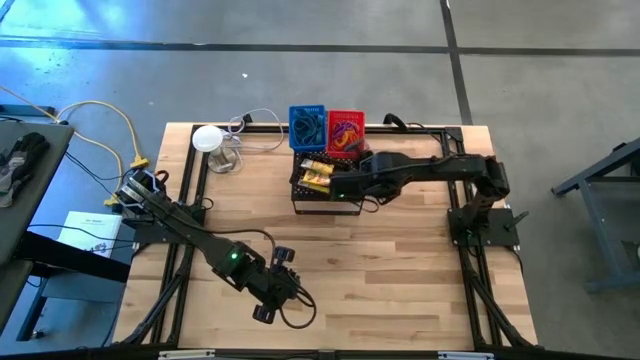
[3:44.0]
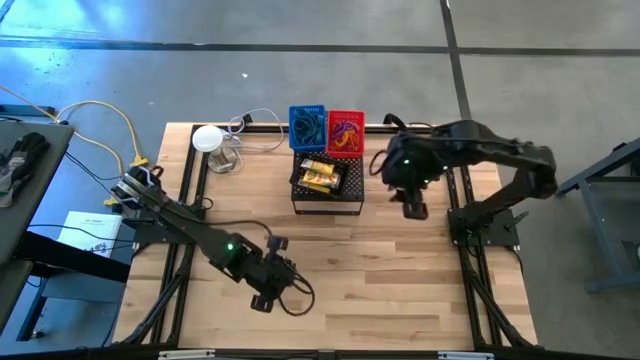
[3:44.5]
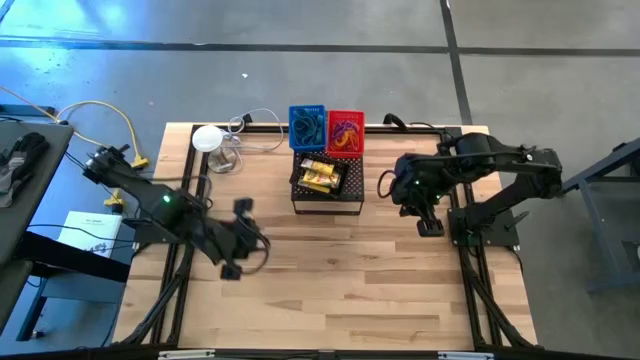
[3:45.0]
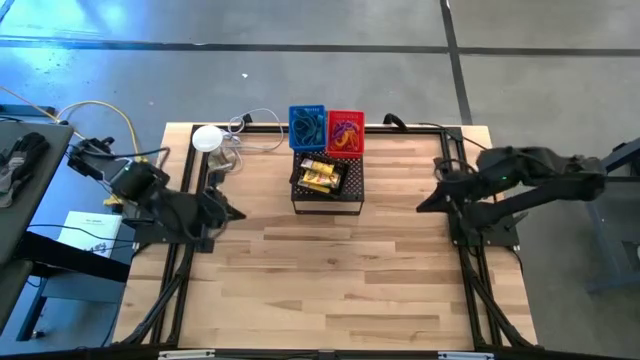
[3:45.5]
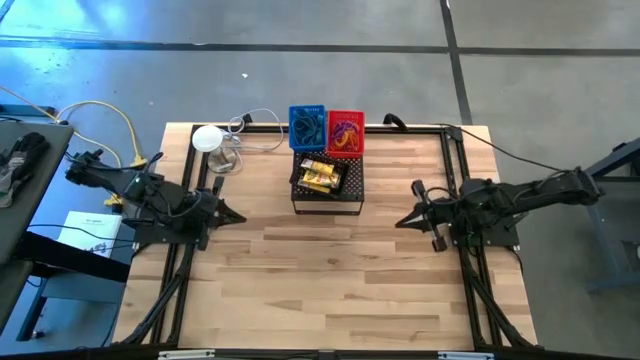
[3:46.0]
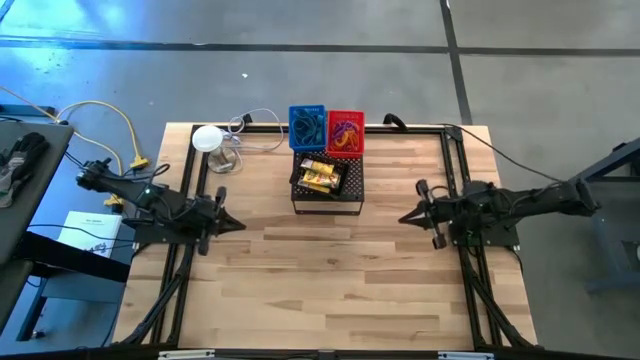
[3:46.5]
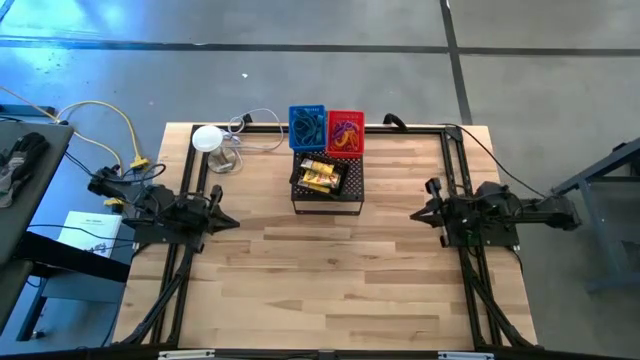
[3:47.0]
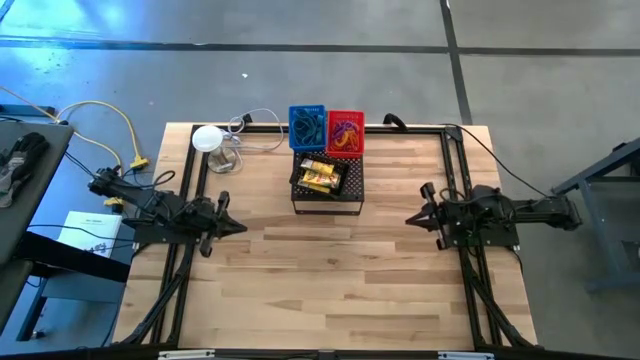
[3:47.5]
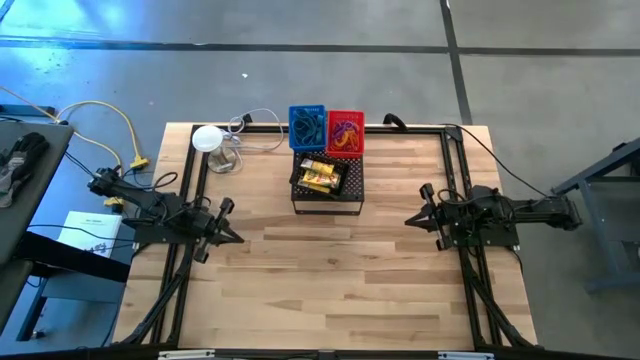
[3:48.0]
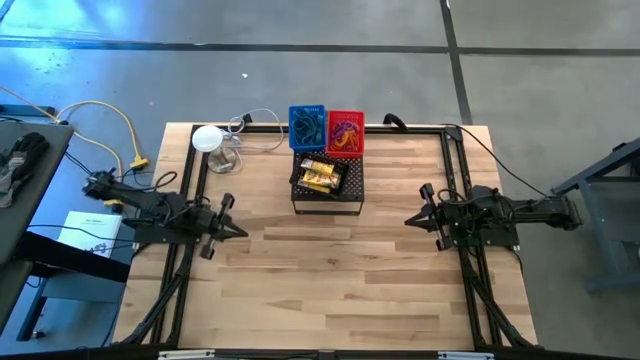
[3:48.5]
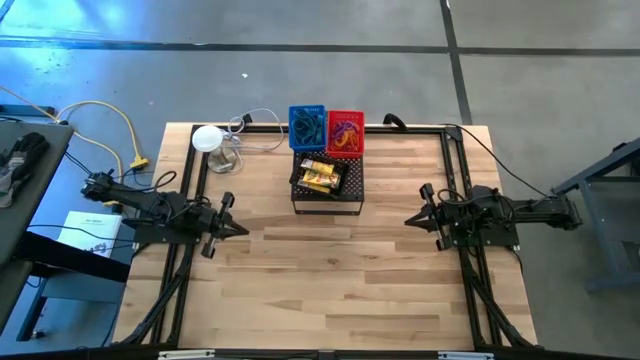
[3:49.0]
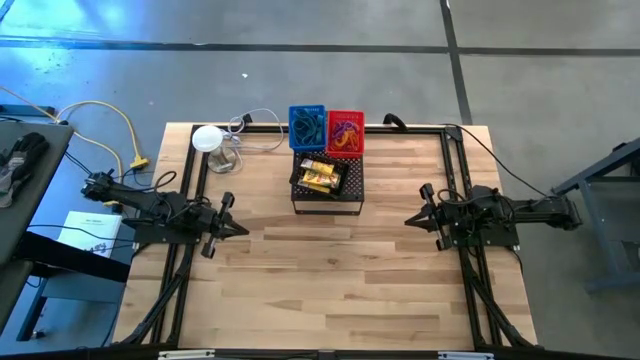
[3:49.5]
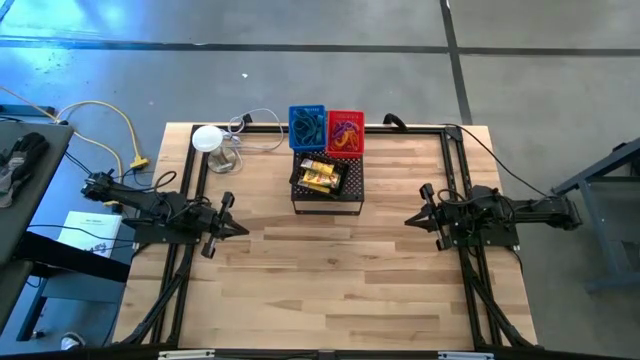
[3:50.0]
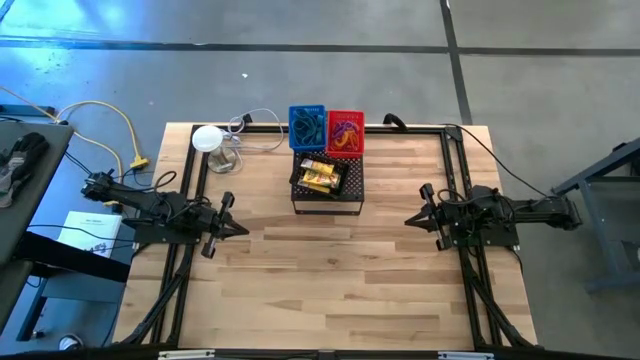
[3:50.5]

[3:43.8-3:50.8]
Task: Pick & Place Office Desk Supplies
Return to Home Position

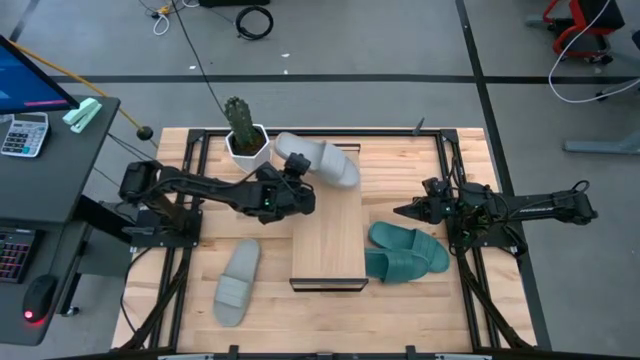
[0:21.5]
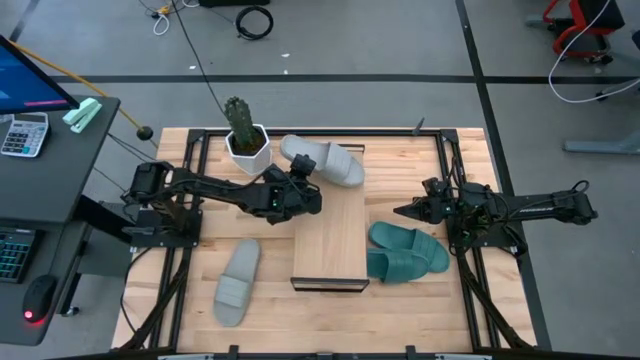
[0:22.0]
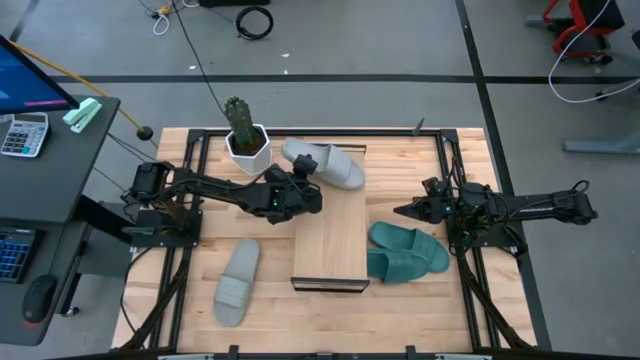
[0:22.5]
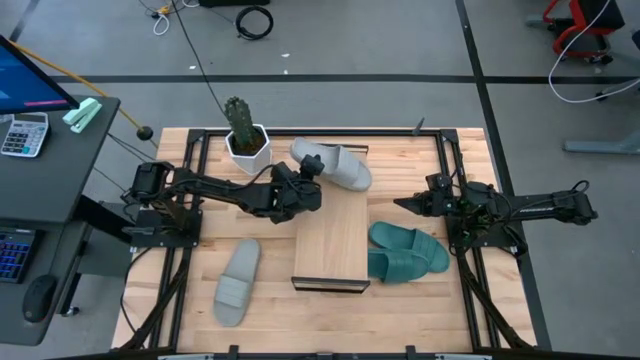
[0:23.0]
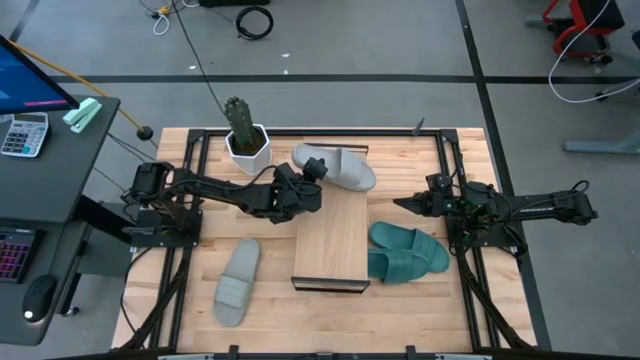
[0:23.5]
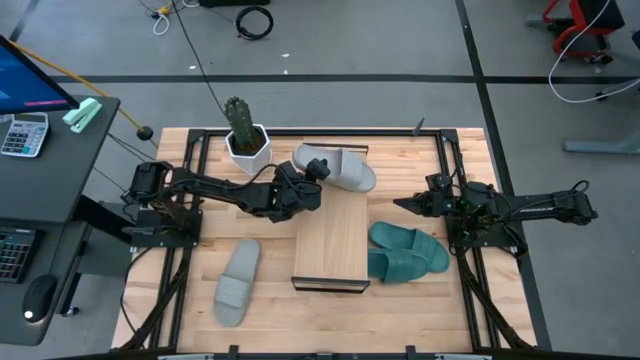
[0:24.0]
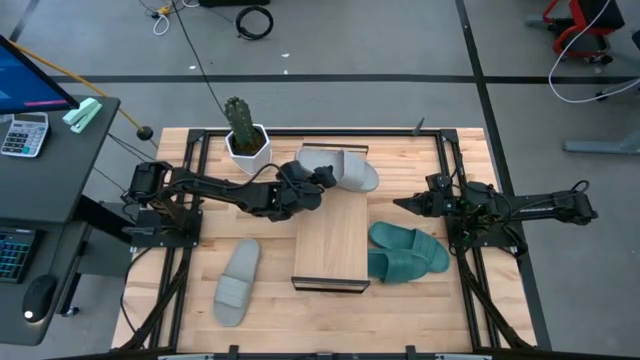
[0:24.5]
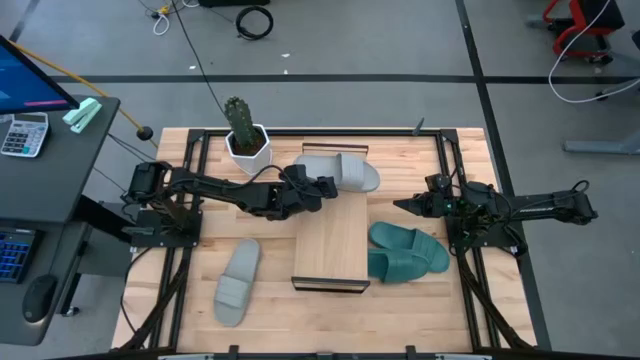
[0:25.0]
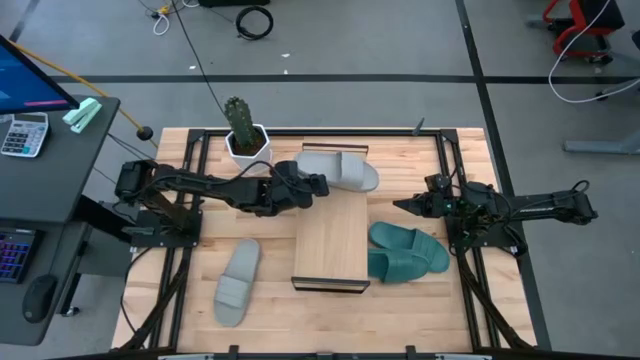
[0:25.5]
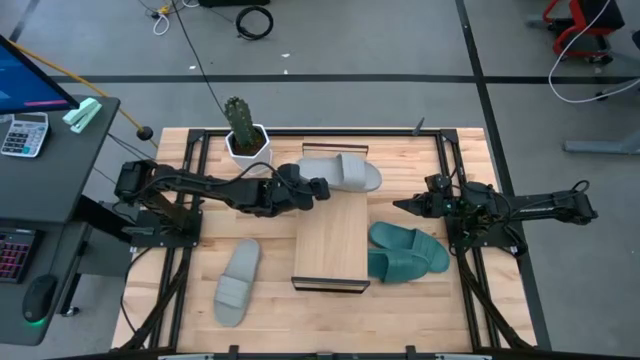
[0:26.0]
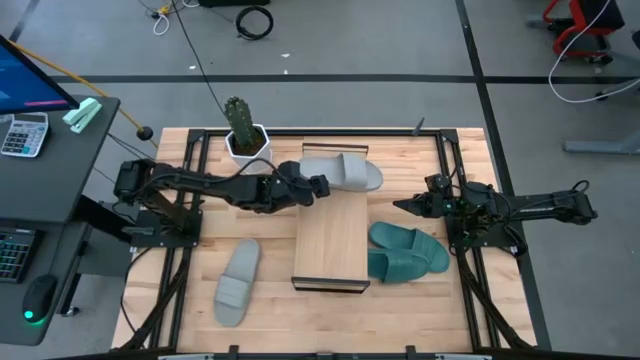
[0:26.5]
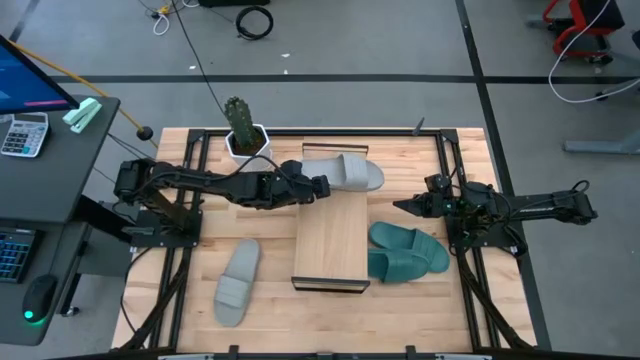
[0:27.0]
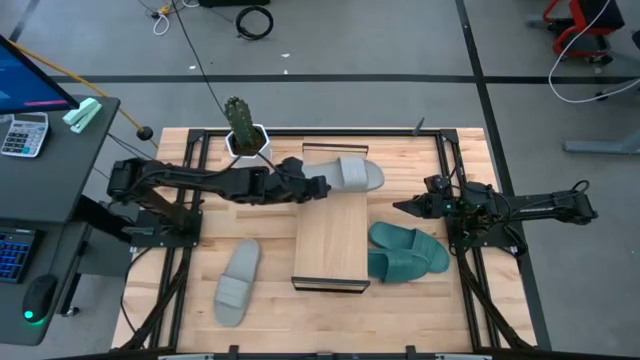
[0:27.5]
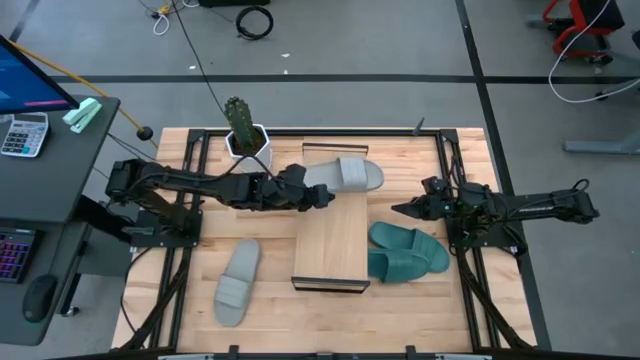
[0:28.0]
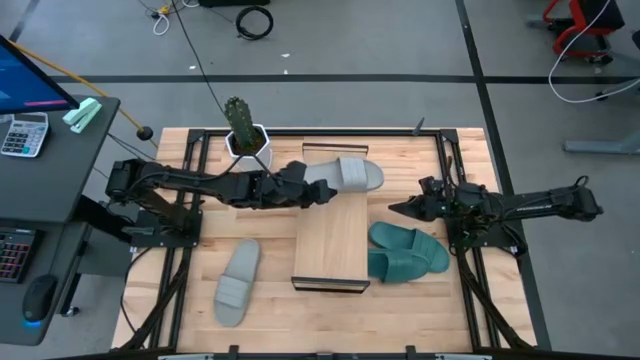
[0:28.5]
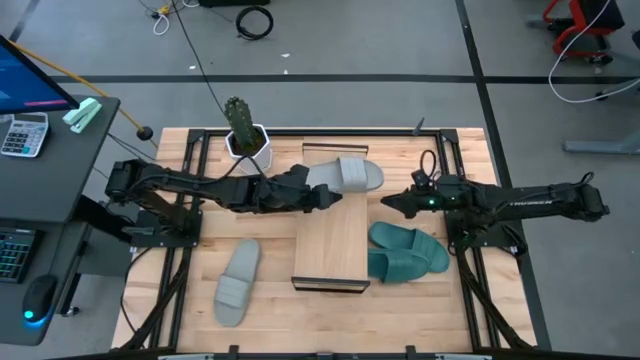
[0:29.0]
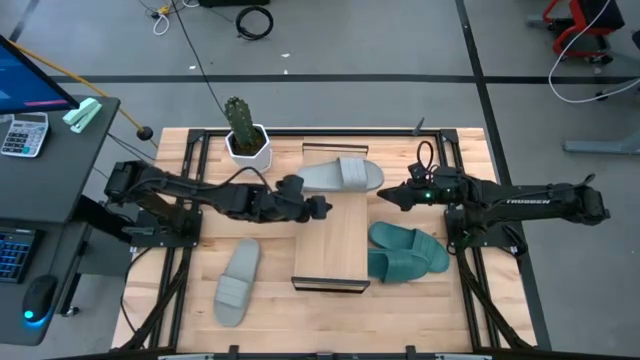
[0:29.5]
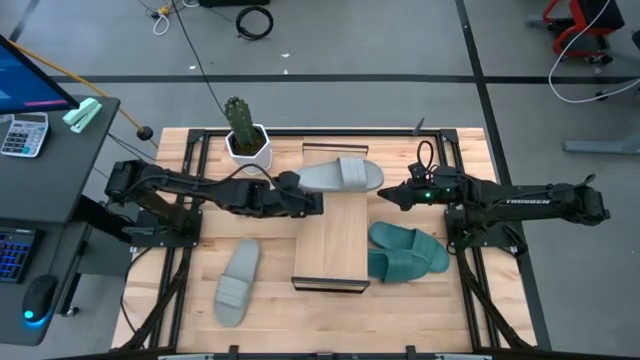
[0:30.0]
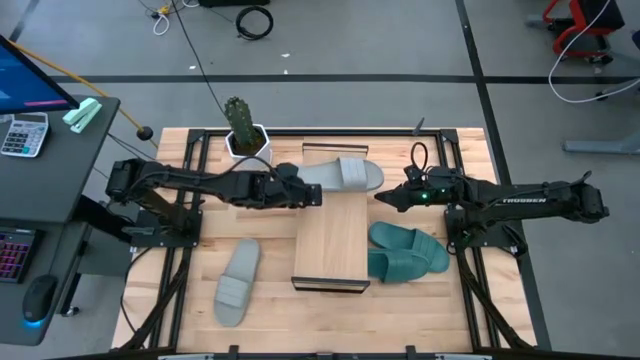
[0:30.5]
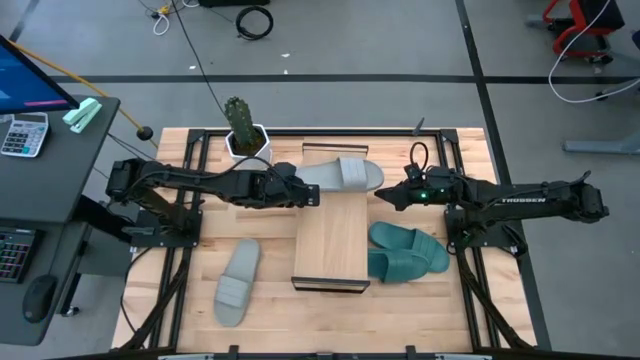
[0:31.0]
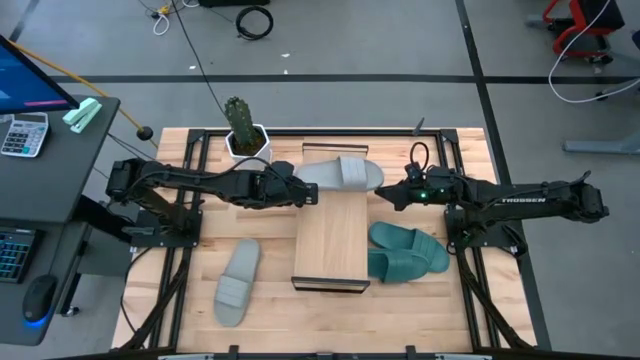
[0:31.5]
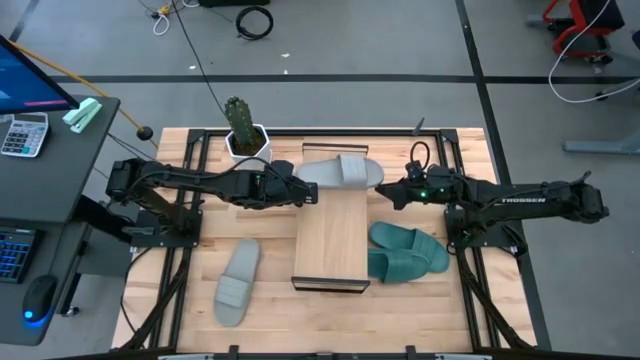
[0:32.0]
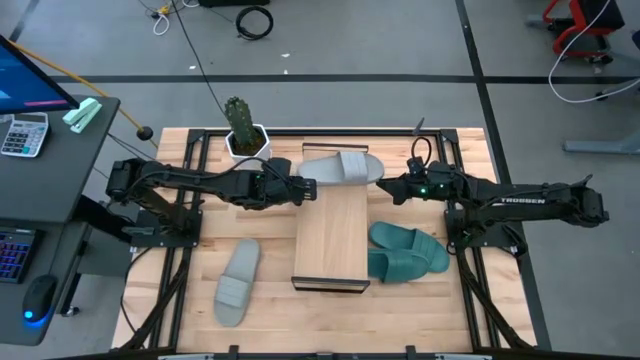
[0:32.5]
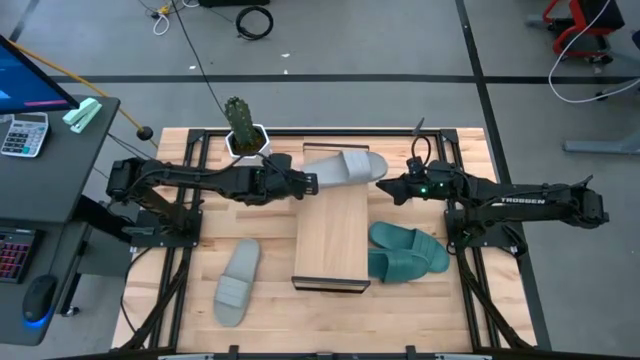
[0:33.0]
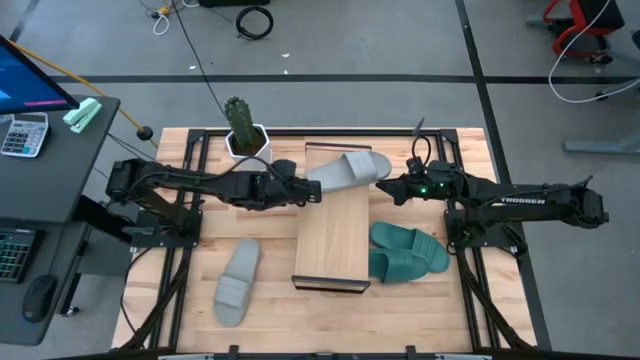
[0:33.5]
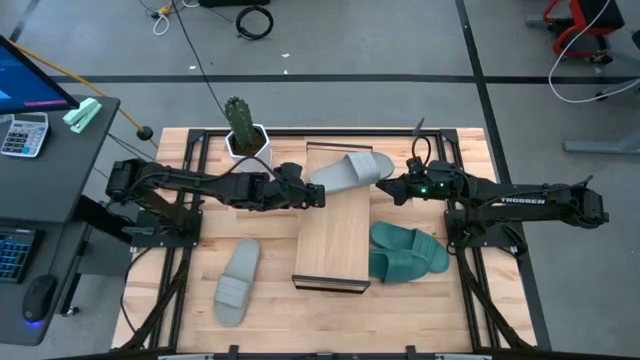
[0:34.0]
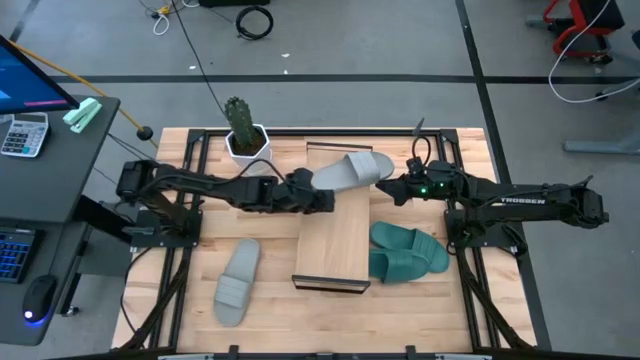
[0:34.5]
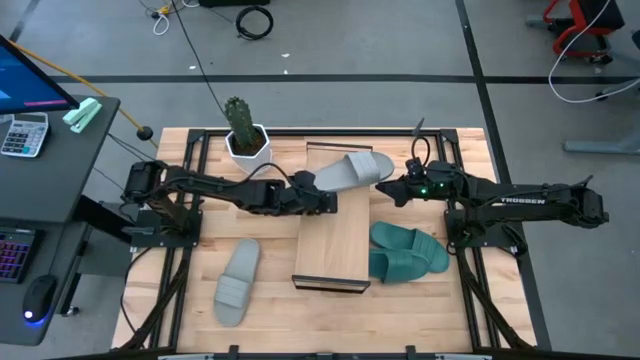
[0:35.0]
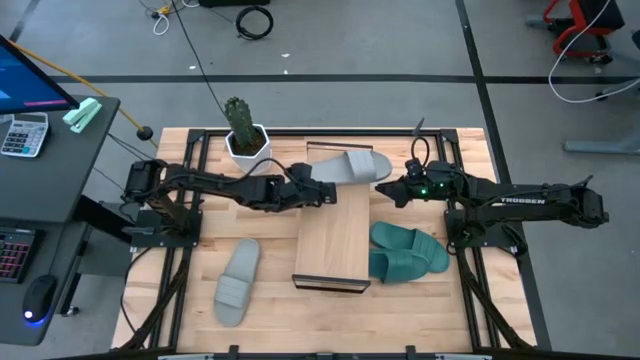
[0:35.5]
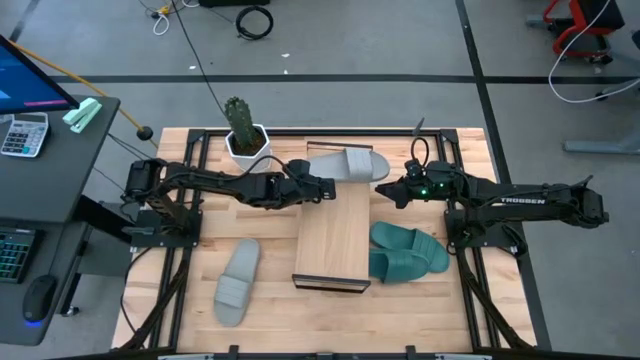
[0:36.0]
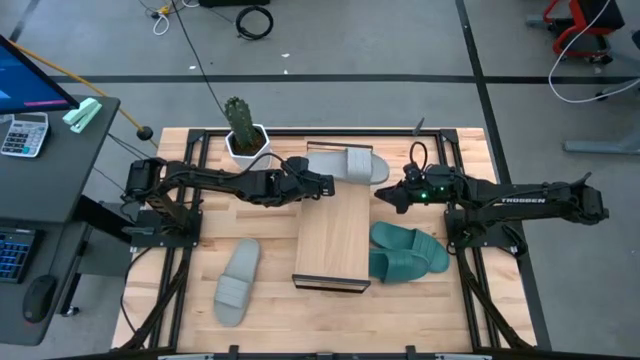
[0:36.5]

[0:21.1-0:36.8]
Task: Pick and place slides into the shelf
Put the right gray slipper onto the shelf
